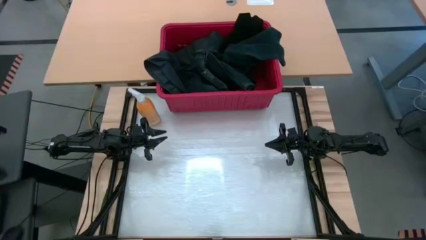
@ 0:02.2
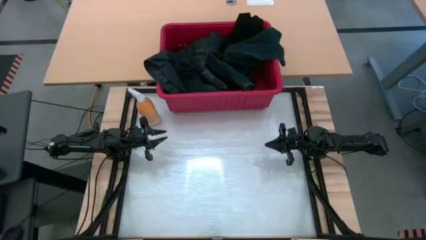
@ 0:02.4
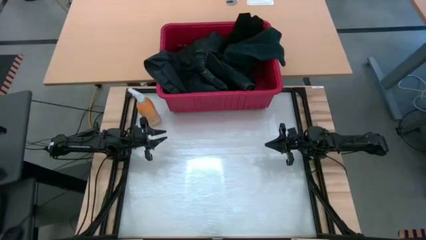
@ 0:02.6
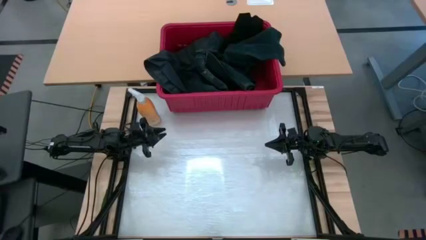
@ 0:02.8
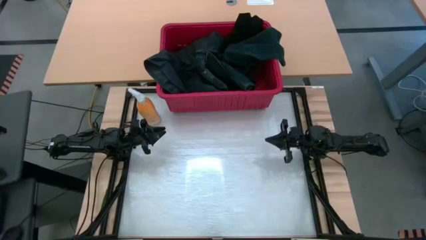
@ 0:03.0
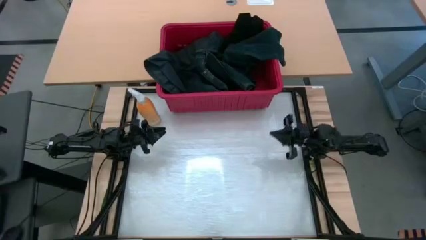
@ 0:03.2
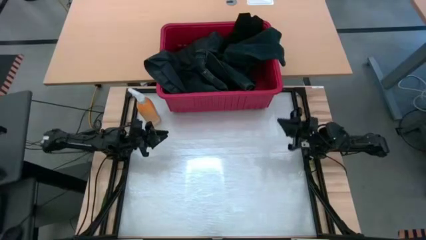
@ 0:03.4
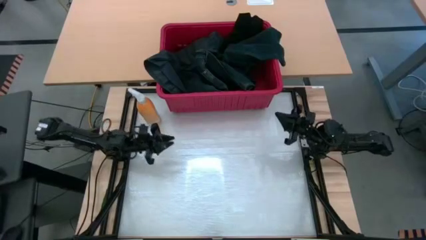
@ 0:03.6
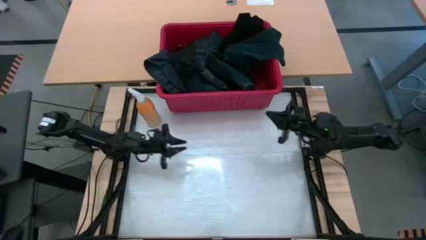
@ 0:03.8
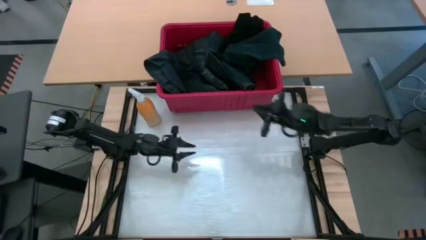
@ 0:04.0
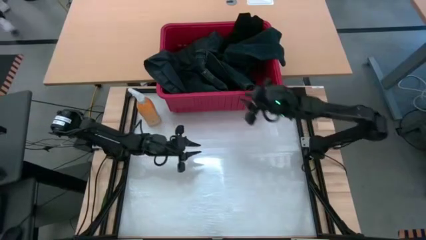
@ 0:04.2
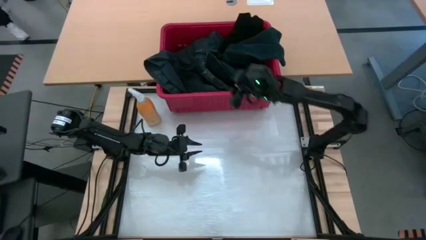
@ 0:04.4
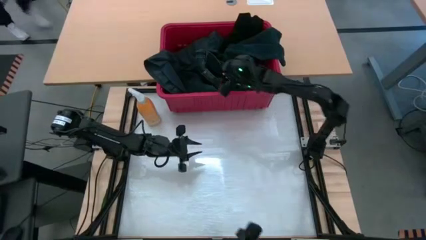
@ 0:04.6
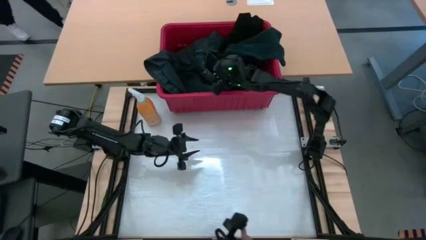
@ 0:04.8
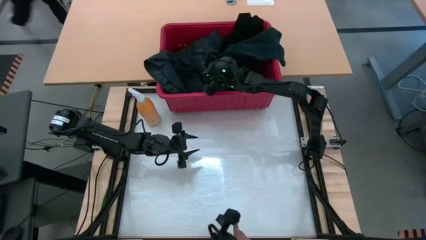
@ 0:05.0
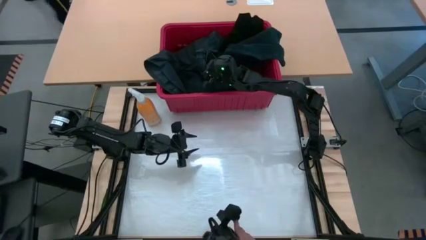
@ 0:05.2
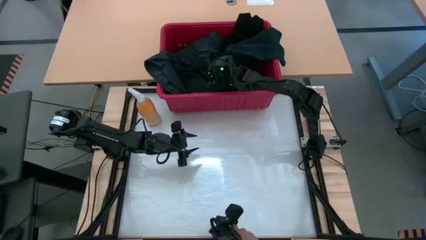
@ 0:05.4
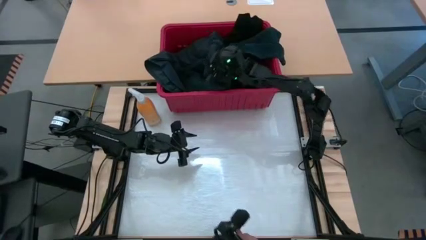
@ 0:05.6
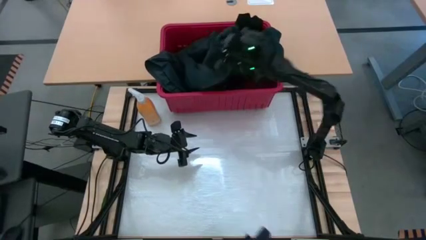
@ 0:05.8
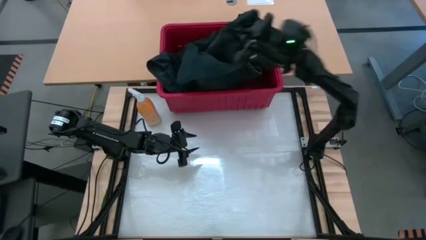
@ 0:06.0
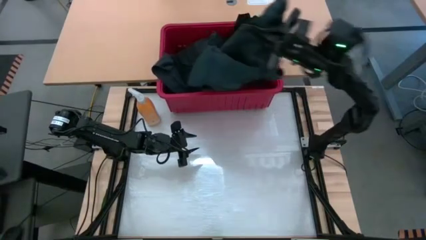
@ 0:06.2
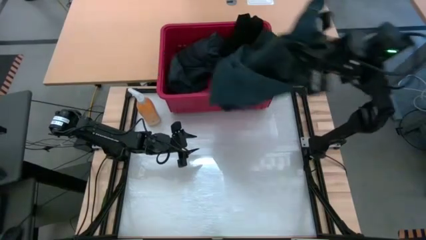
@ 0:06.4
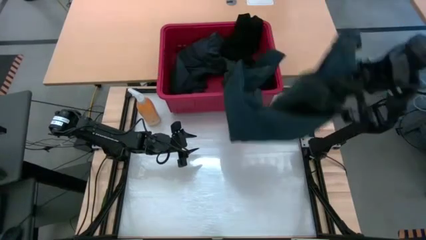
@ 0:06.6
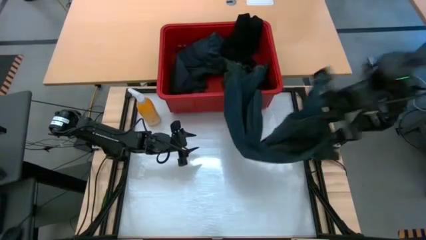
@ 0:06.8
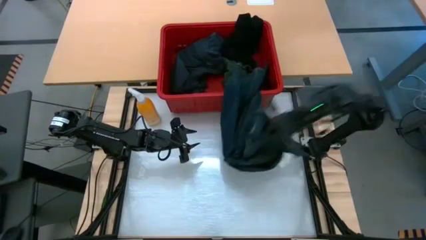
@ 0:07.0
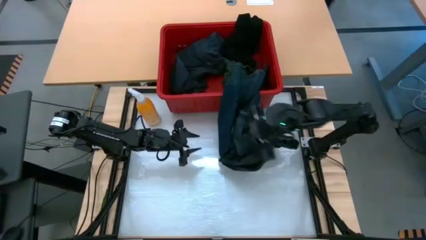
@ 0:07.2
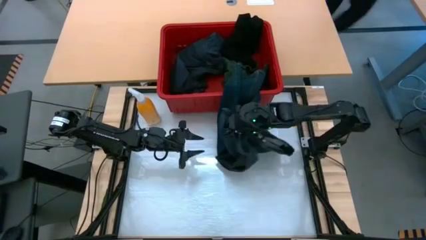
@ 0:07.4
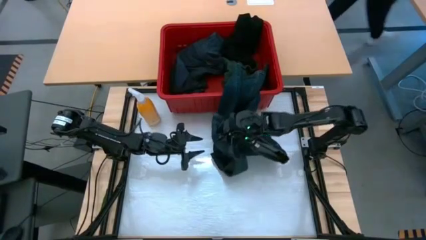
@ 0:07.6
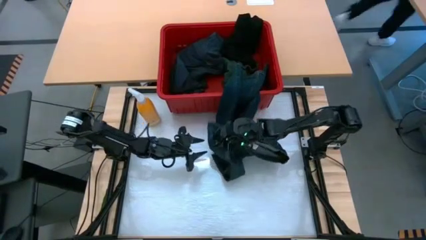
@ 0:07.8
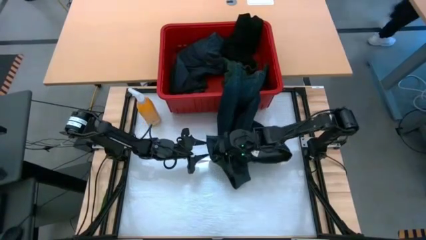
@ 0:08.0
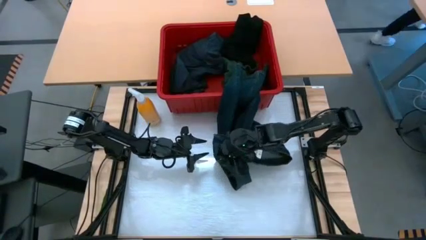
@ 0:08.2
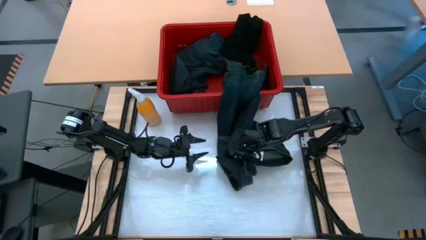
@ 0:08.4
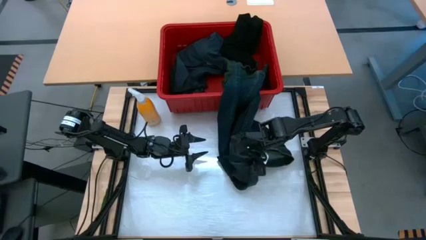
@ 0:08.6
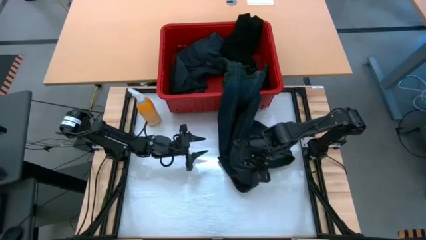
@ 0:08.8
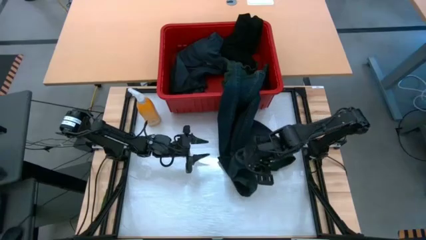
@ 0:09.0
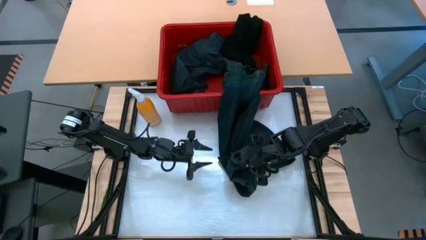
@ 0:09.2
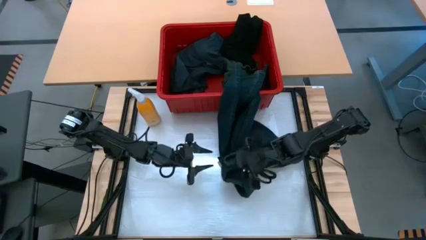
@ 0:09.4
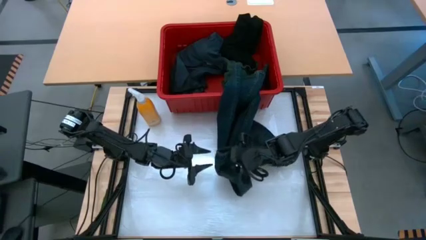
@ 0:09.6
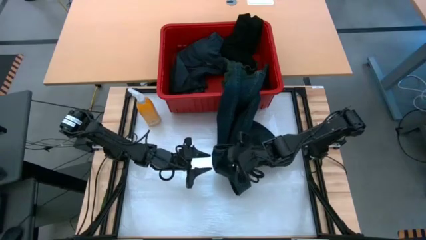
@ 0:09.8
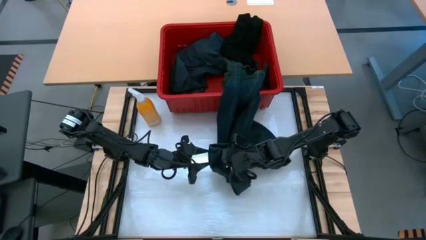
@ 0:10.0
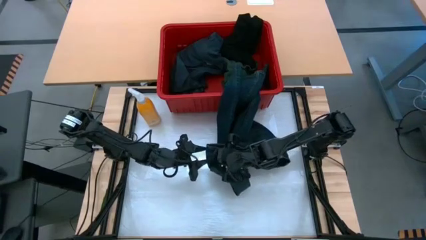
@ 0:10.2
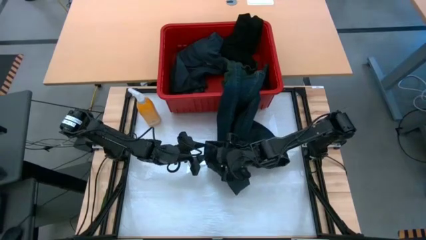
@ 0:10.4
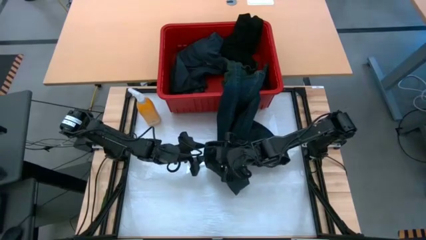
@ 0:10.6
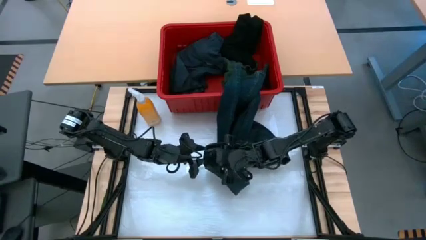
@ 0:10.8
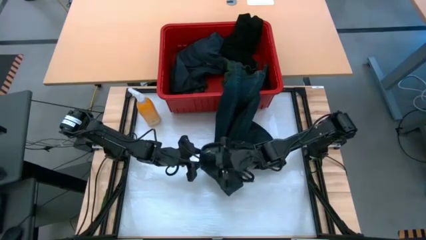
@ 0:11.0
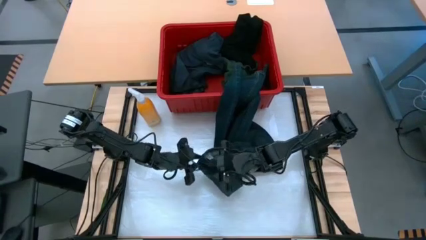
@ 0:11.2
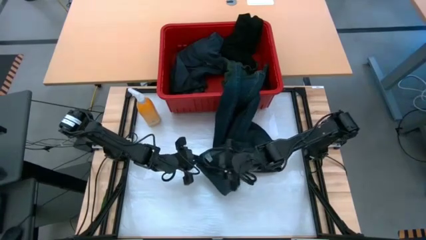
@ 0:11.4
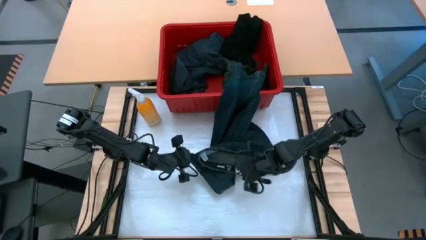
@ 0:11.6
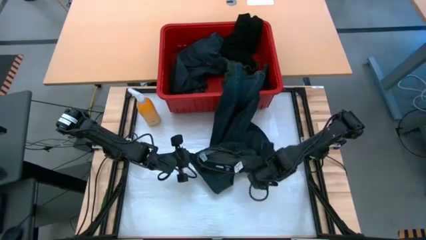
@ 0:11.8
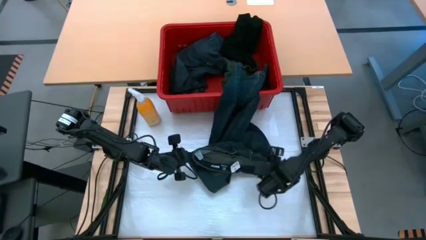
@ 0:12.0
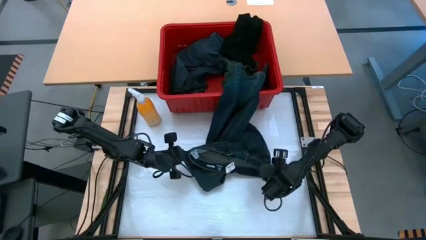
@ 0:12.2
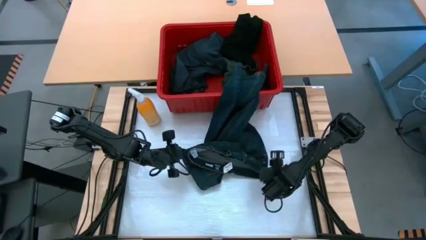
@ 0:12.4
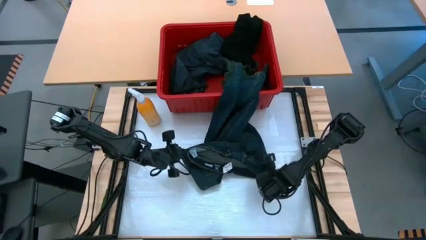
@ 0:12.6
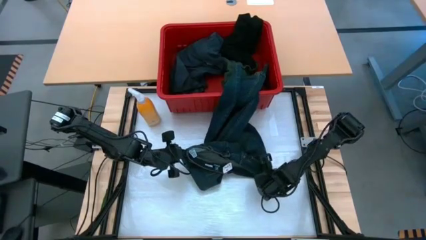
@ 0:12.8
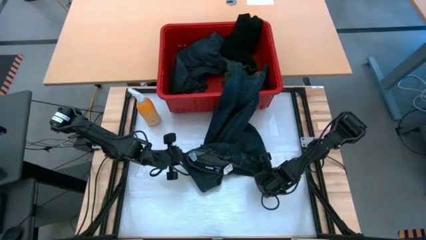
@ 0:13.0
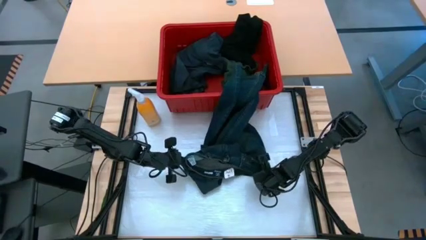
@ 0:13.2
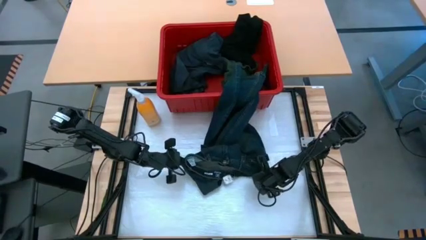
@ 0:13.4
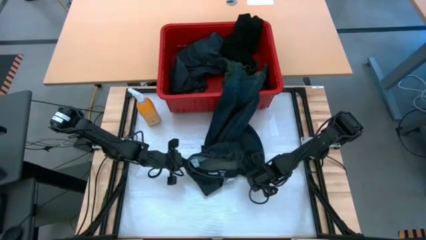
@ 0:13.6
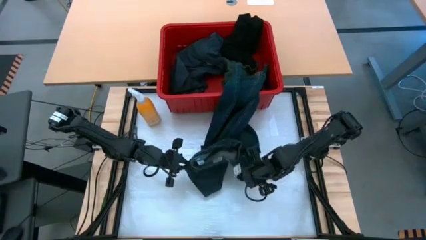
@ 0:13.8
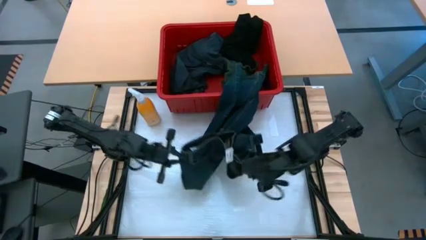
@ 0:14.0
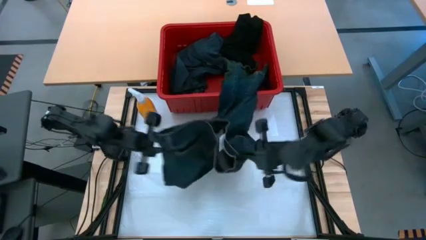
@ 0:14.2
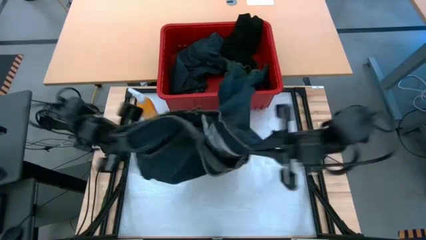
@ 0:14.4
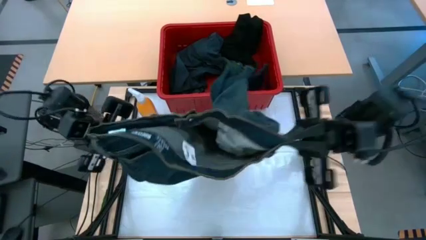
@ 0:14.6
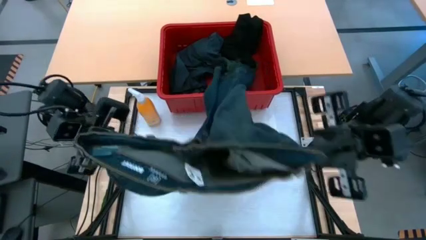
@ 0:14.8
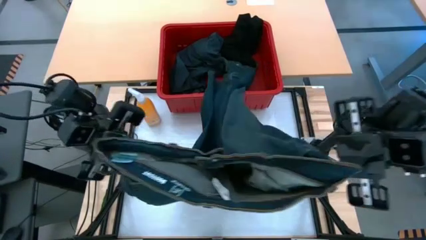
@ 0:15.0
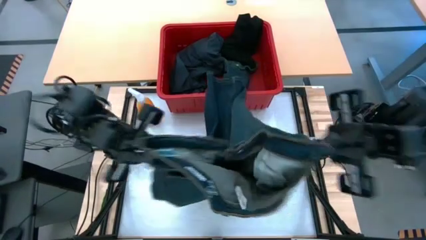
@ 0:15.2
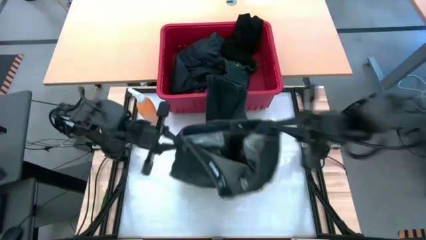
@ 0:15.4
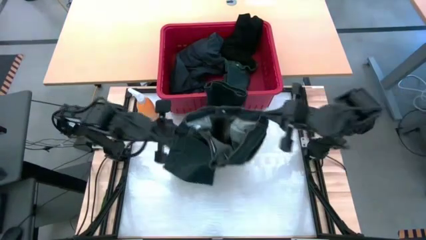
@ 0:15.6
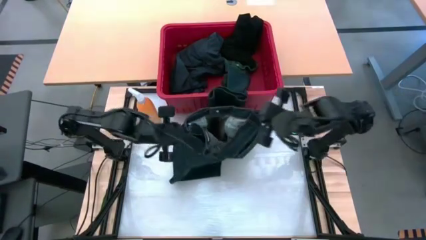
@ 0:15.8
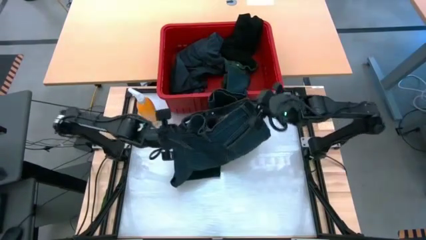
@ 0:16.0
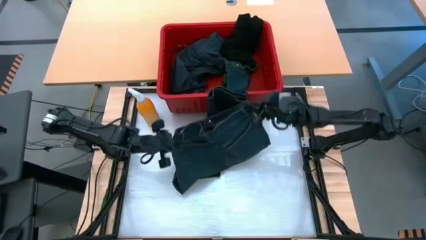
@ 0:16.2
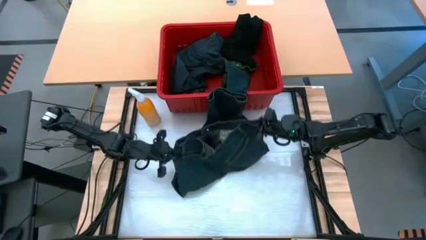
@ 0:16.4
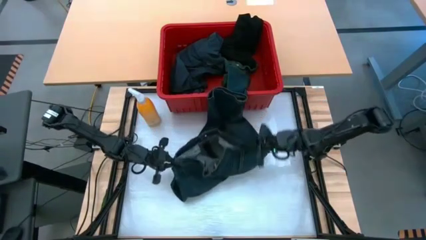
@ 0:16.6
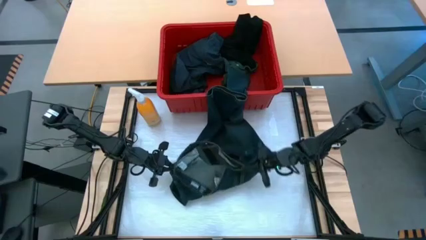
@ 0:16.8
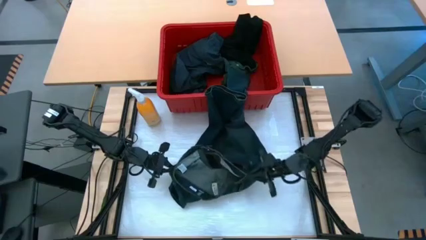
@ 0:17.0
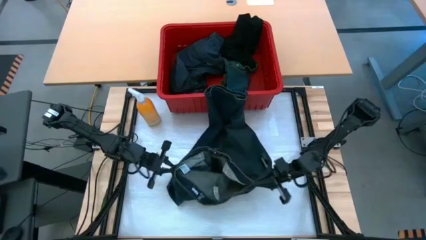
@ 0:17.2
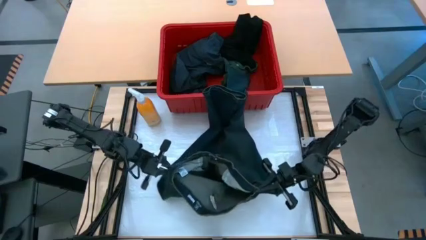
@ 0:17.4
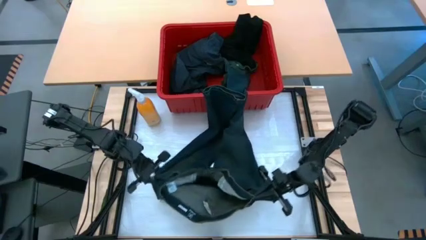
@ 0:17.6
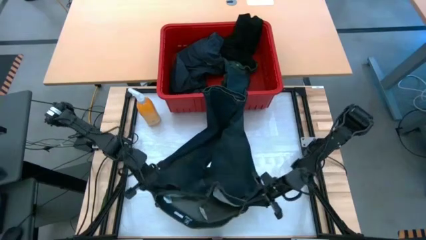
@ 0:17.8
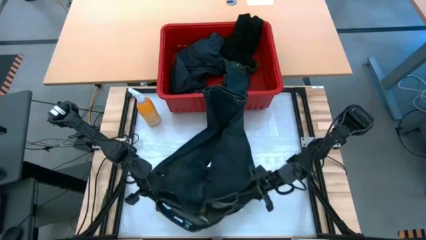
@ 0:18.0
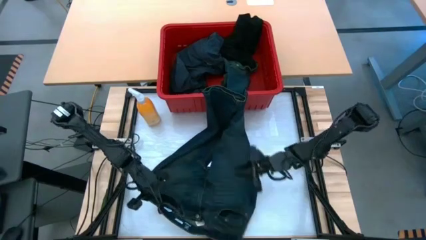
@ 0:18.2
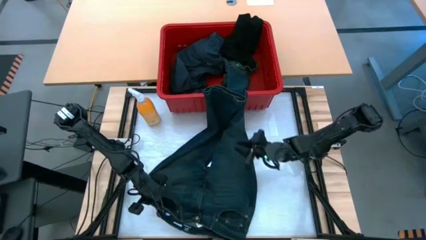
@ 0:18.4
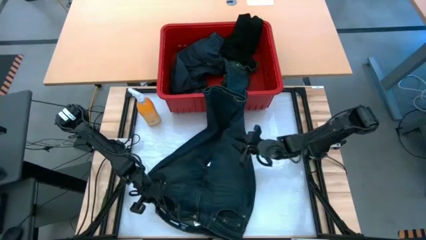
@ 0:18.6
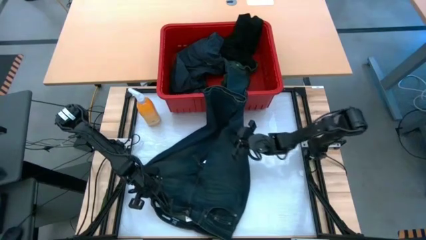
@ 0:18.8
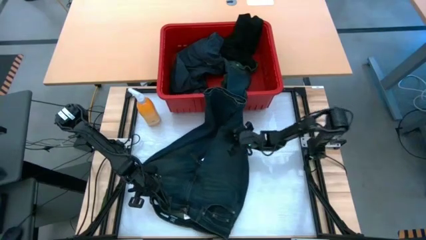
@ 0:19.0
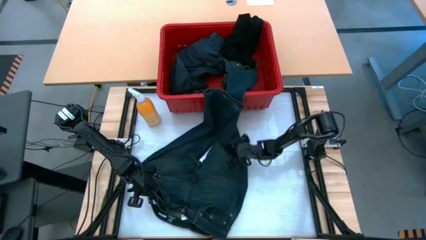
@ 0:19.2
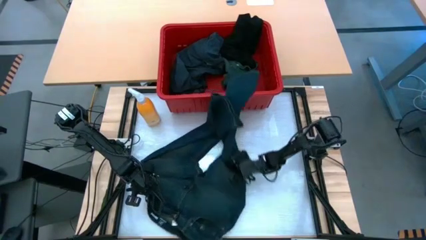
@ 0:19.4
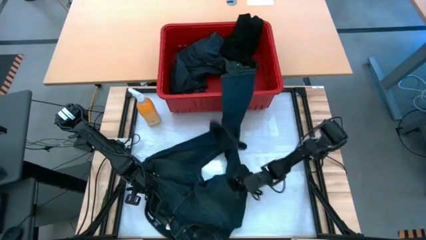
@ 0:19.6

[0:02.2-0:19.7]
Task: Fold Laundry from Bin
Fold the dark blue jeans
